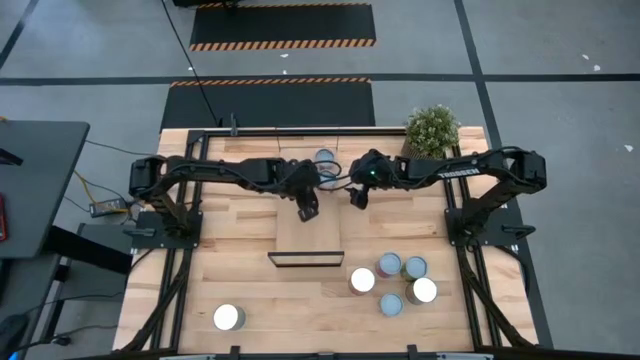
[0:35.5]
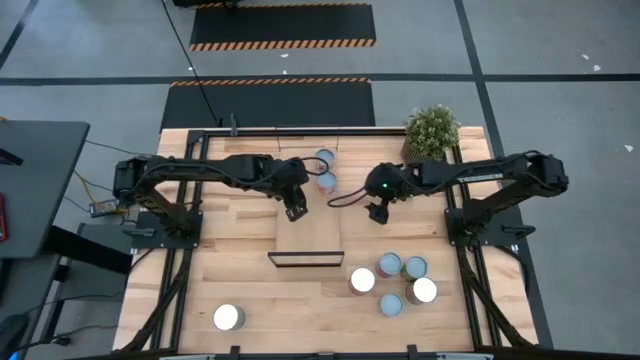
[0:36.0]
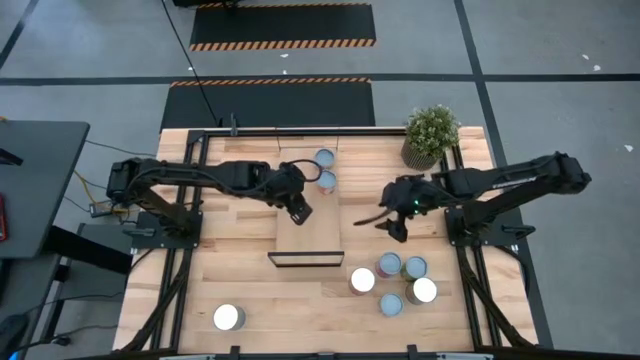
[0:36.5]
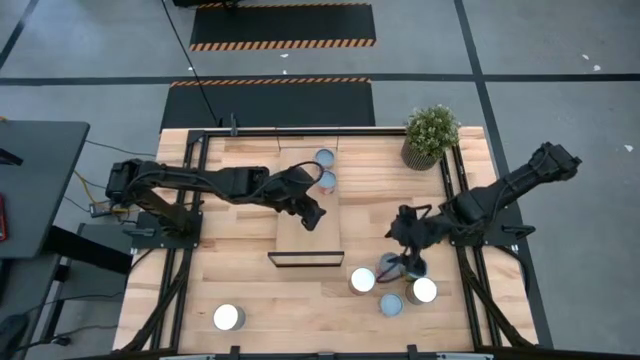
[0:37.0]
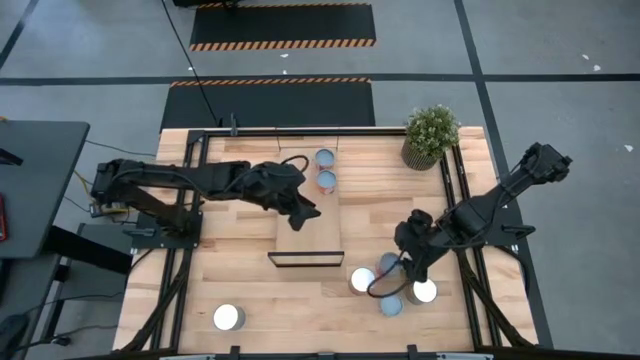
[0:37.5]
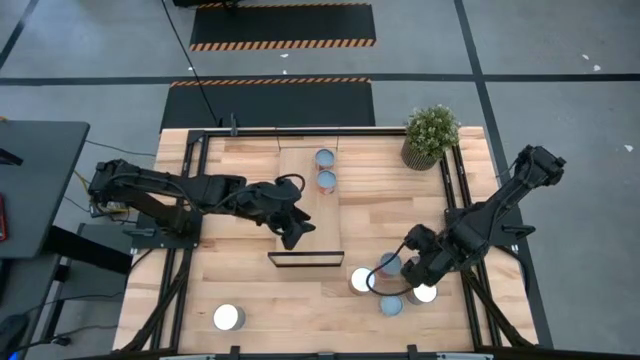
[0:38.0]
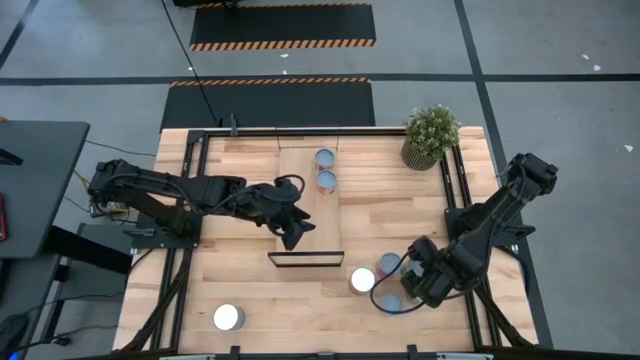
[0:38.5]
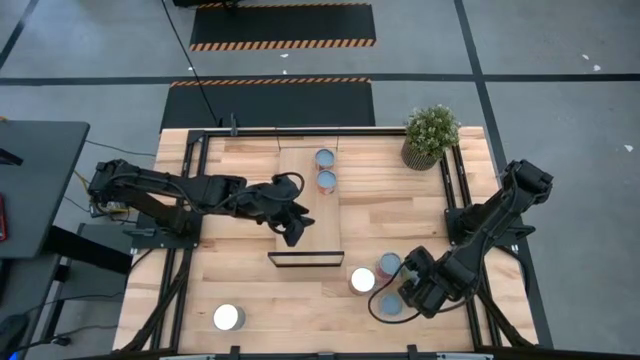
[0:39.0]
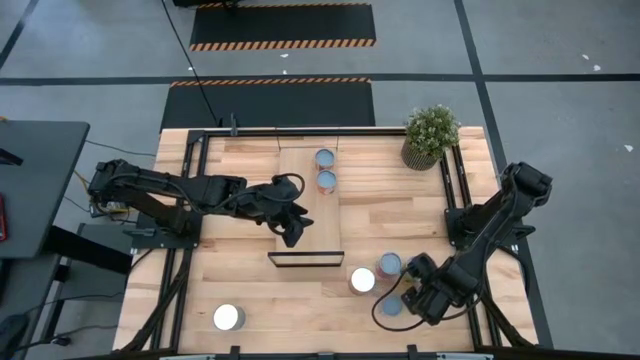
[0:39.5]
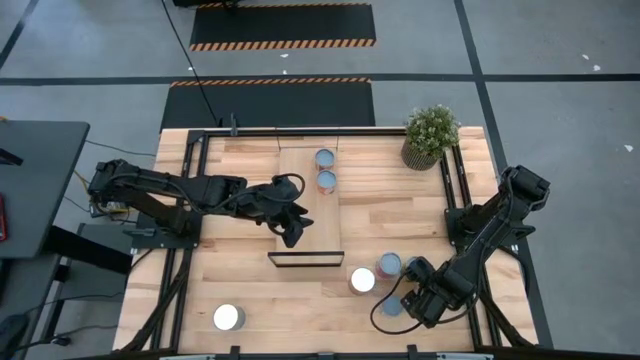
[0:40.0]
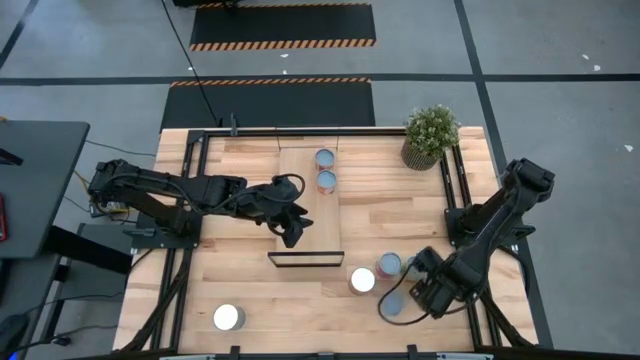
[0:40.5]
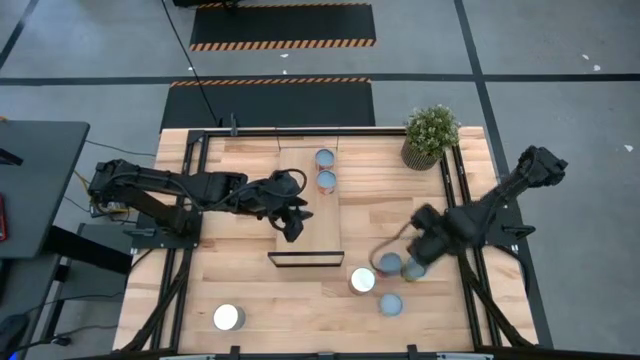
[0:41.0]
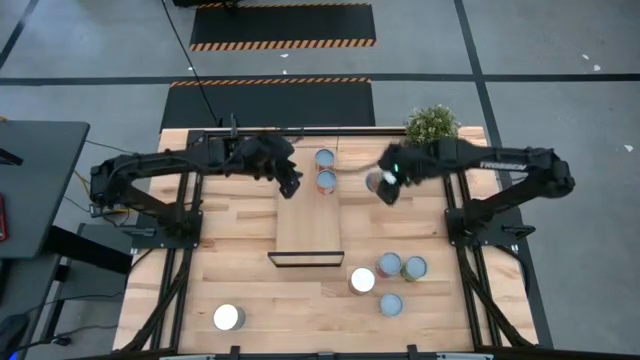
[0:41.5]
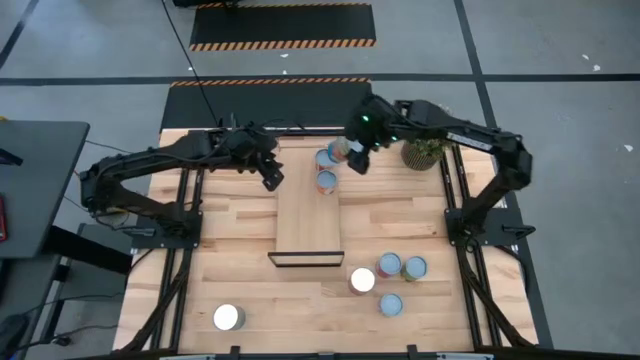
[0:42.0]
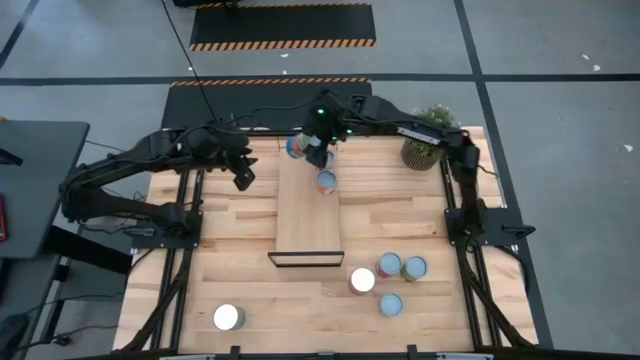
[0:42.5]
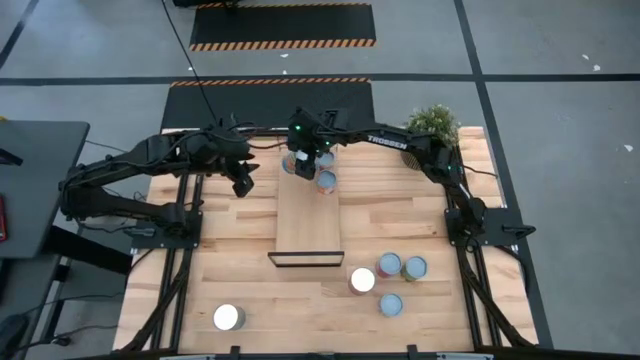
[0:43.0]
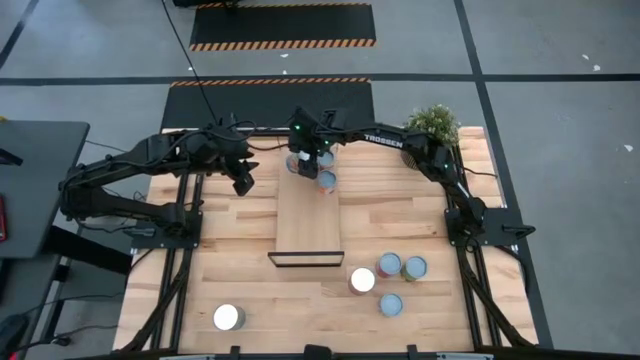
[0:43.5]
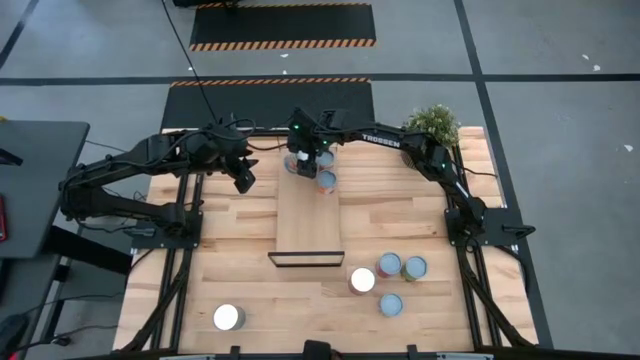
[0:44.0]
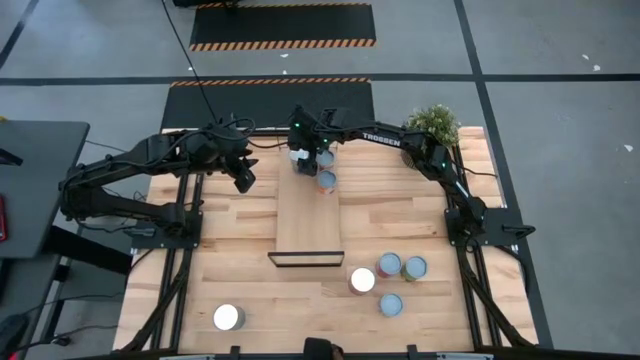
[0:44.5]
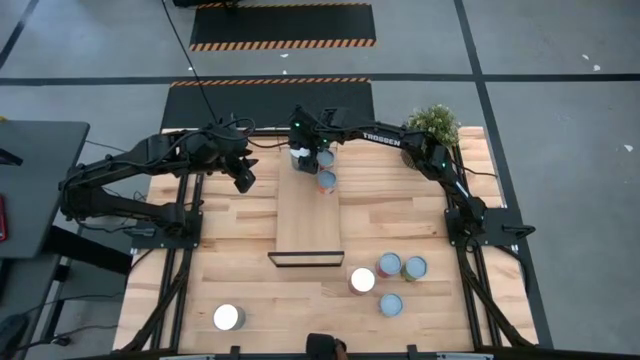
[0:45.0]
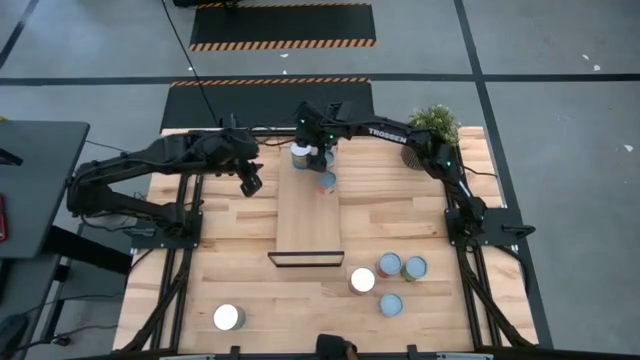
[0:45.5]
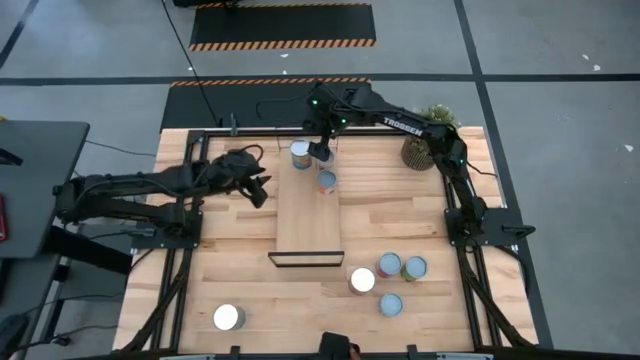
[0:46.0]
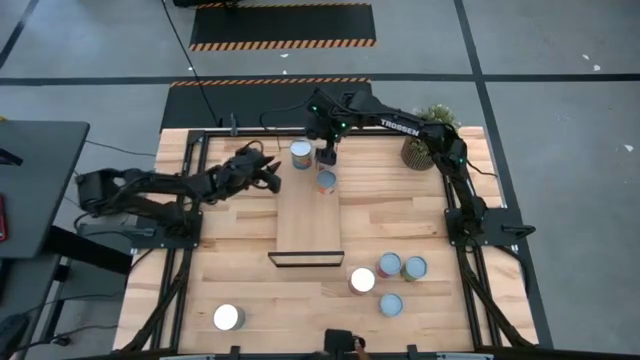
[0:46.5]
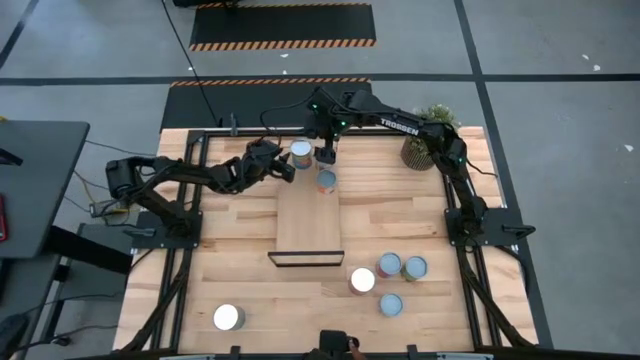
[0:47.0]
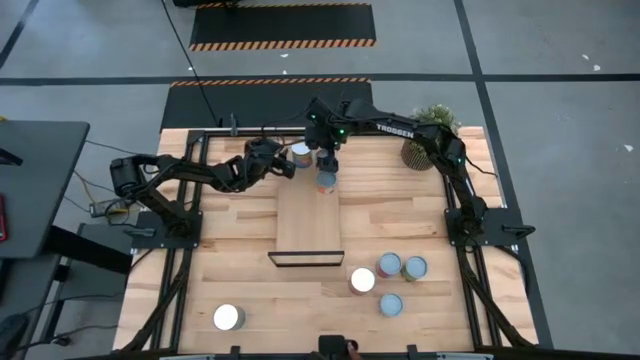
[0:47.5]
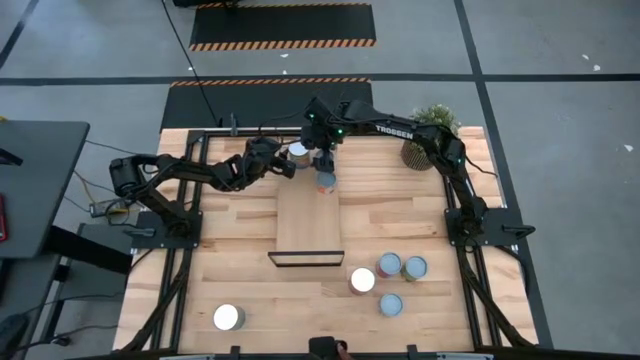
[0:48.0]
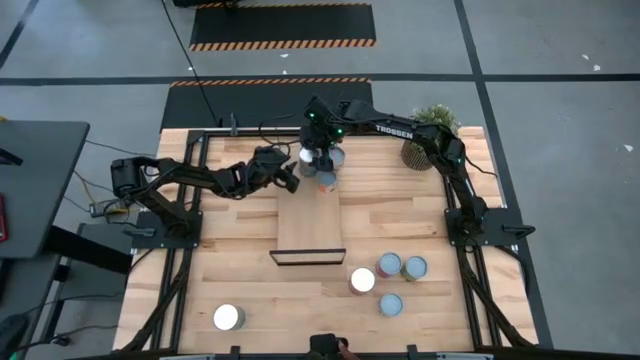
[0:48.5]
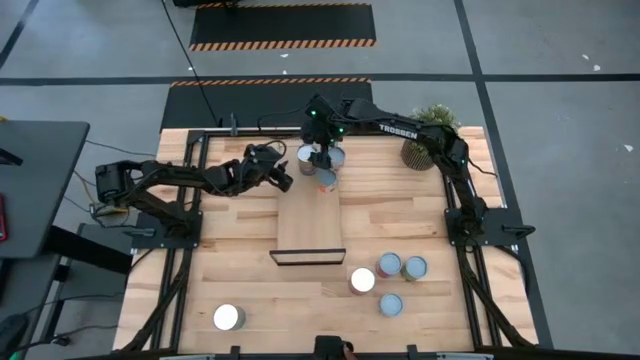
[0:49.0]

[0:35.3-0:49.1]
Task: Pick and place cans onto a shelf
Put the blue can on the shelf

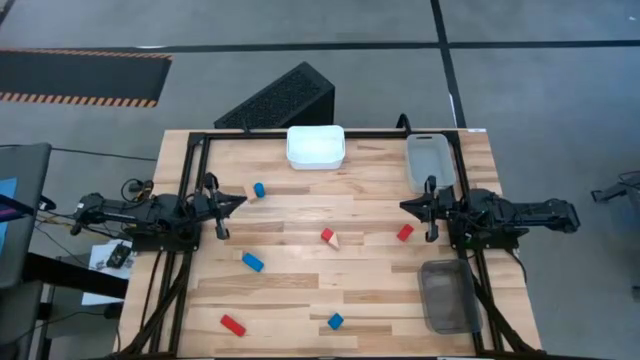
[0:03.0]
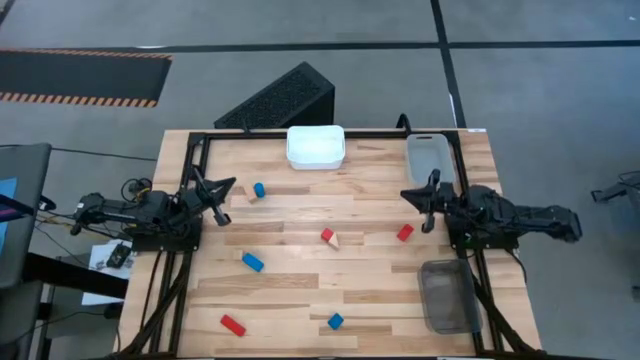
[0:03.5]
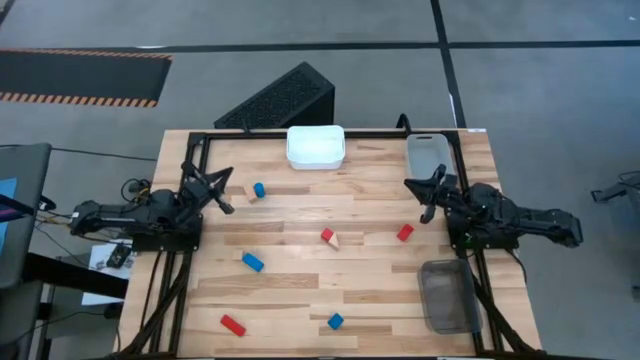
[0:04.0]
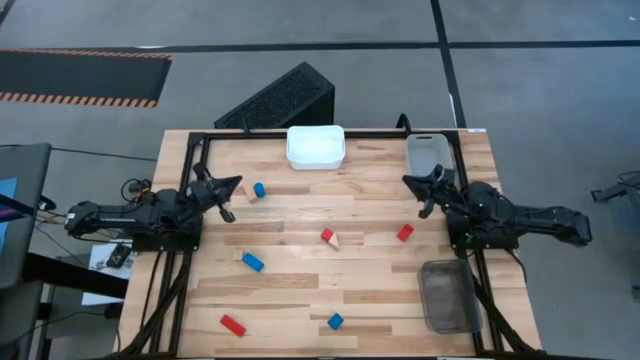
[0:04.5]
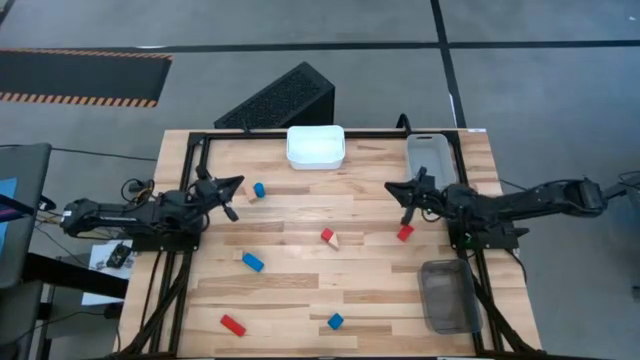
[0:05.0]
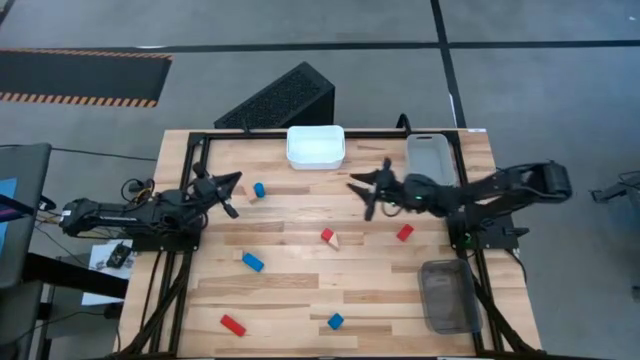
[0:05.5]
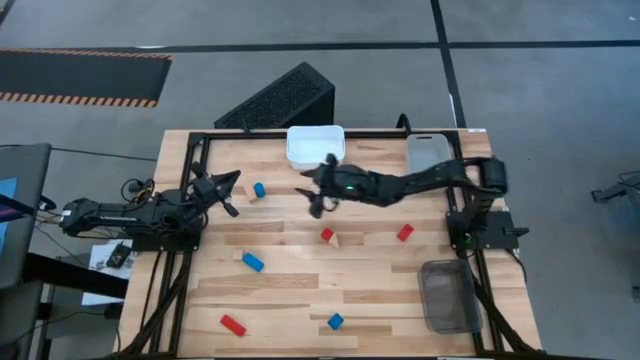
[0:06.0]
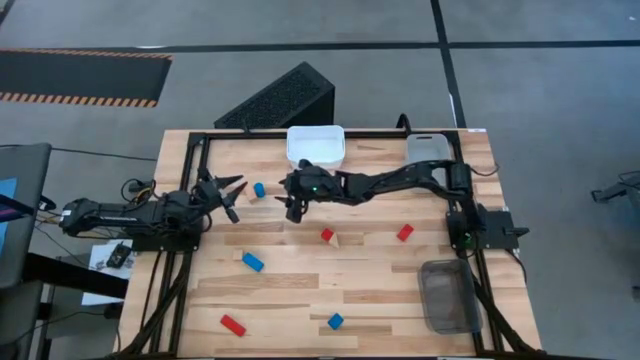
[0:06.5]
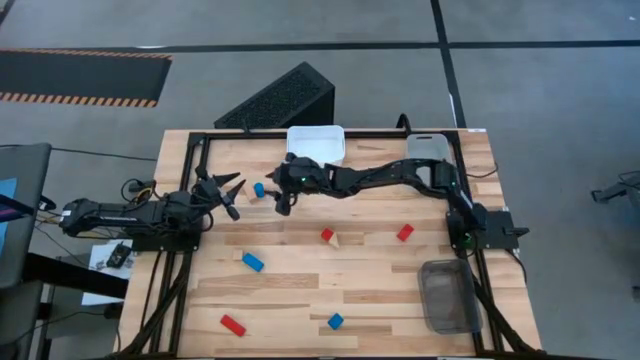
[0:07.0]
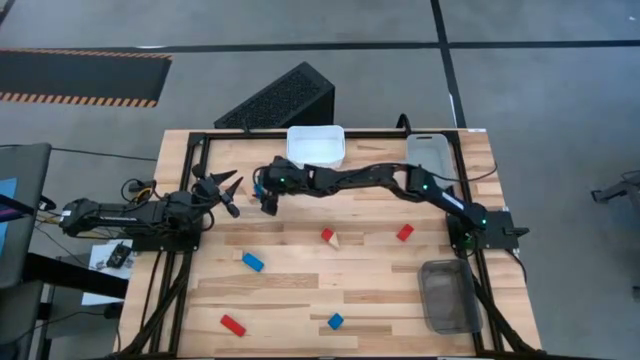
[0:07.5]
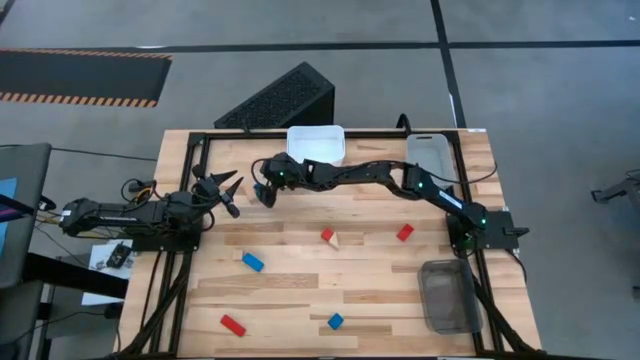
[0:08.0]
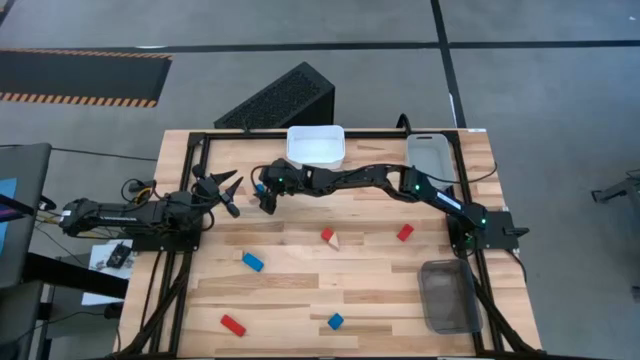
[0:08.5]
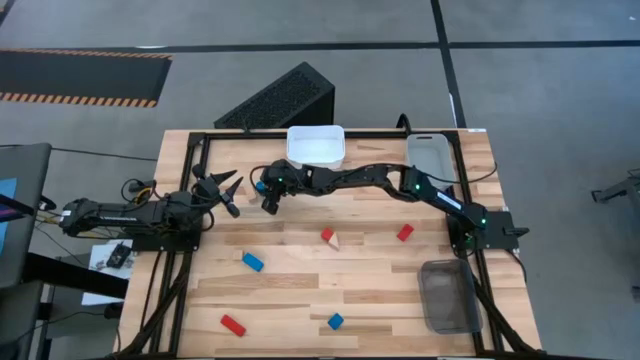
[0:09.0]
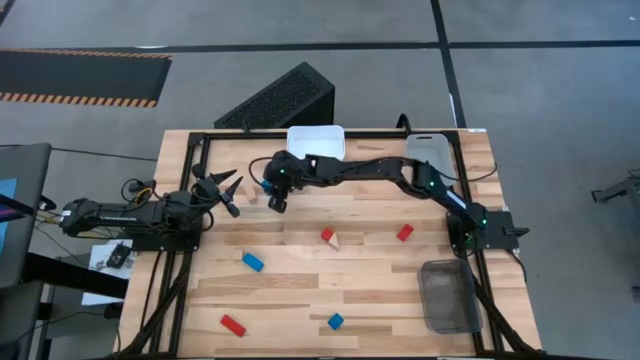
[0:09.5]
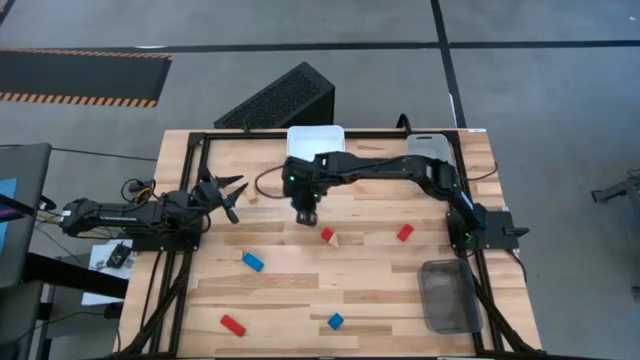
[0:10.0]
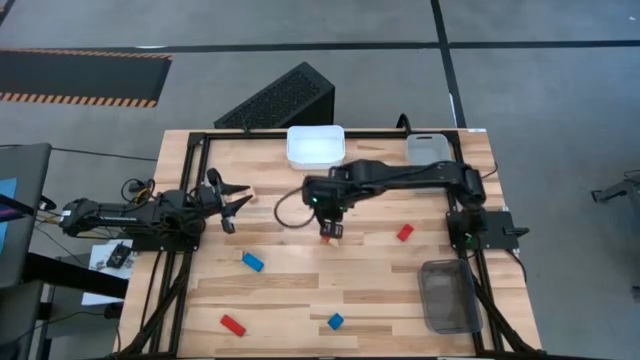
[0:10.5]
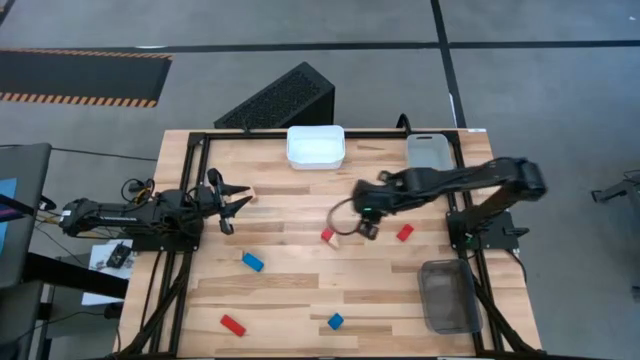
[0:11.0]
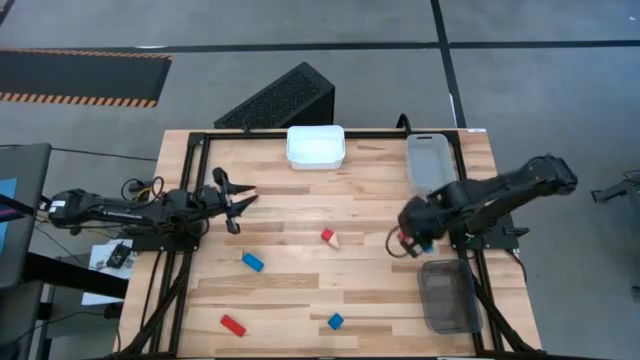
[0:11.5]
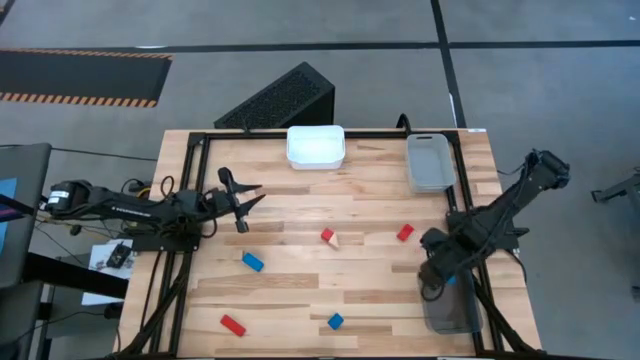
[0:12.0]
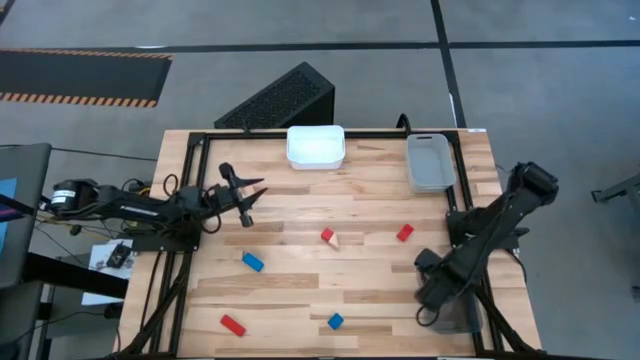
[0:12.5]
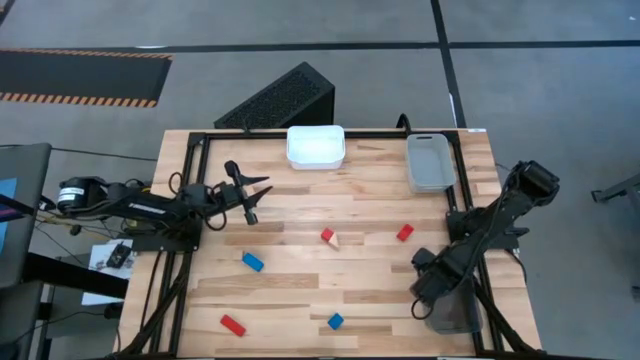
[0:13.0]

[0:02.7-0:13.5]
Task: Sort & place blocks by color
Put the top left blue block into the black bin
